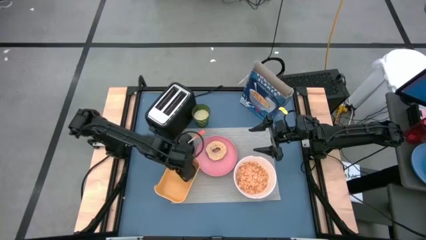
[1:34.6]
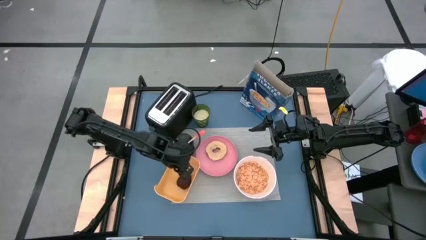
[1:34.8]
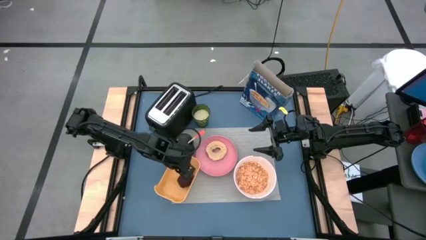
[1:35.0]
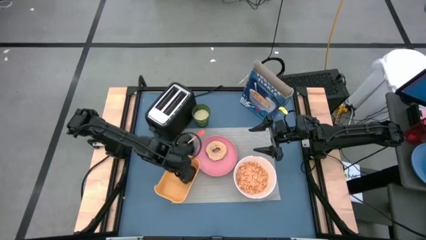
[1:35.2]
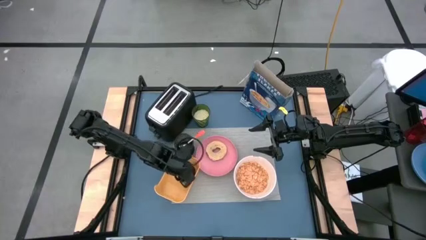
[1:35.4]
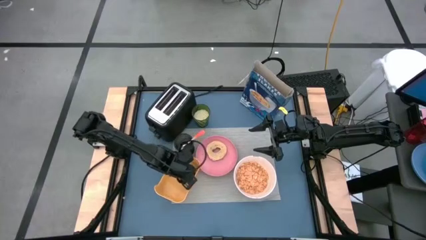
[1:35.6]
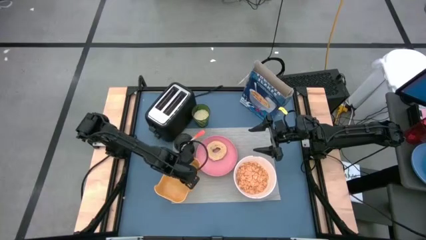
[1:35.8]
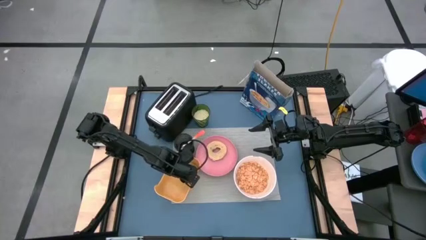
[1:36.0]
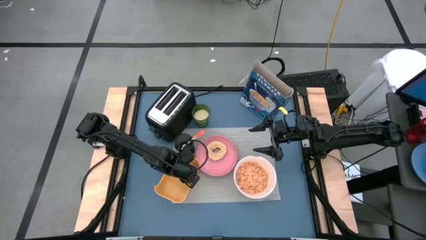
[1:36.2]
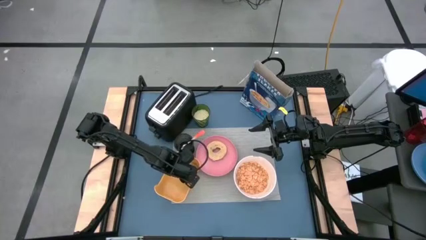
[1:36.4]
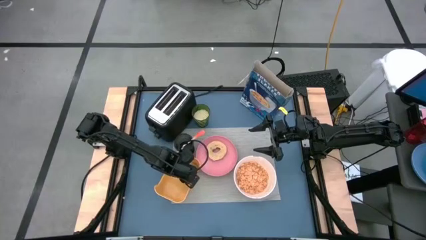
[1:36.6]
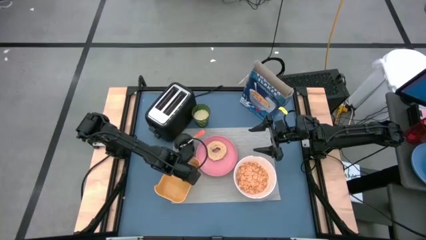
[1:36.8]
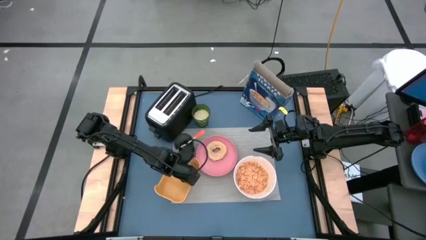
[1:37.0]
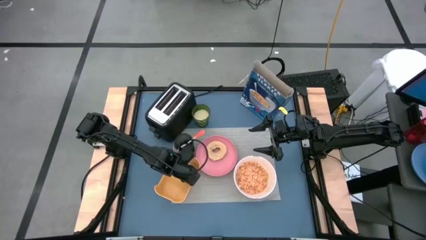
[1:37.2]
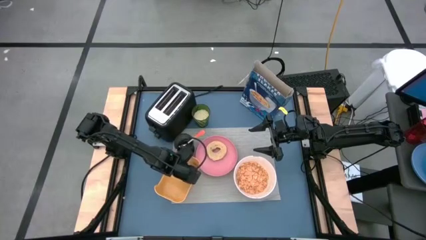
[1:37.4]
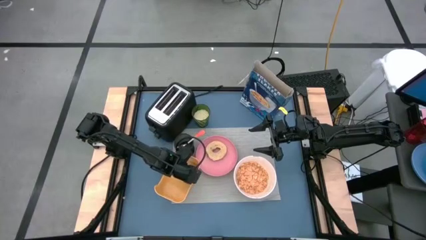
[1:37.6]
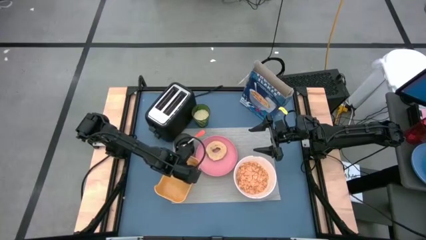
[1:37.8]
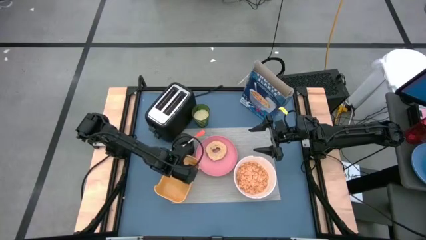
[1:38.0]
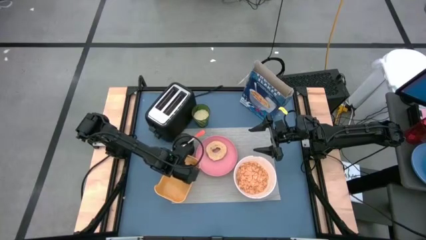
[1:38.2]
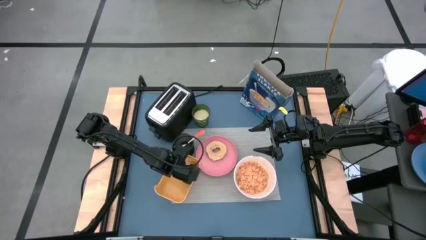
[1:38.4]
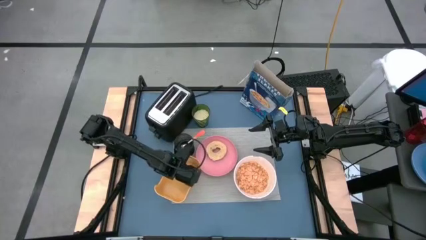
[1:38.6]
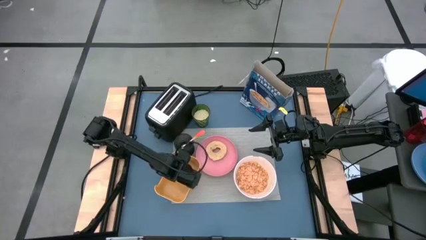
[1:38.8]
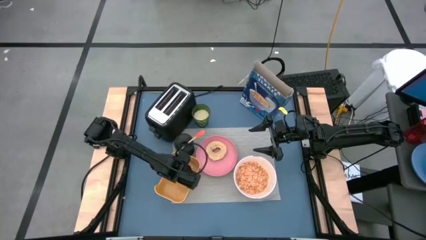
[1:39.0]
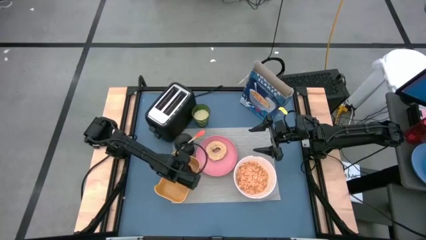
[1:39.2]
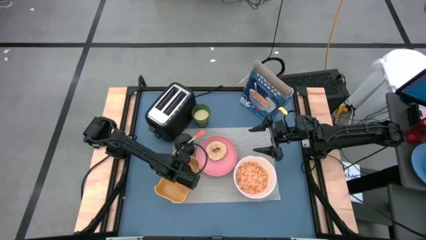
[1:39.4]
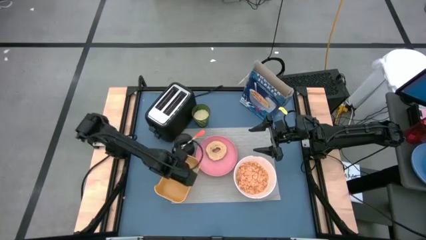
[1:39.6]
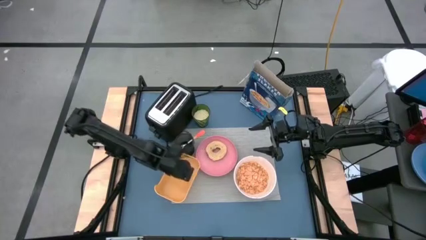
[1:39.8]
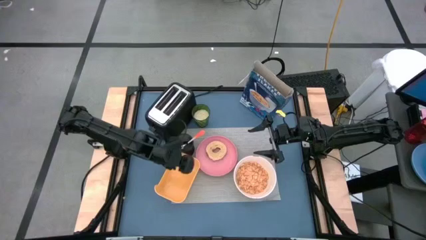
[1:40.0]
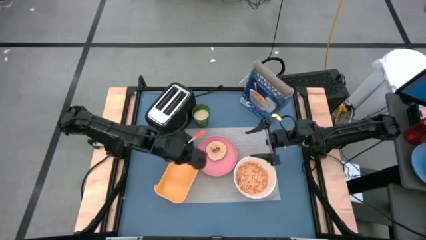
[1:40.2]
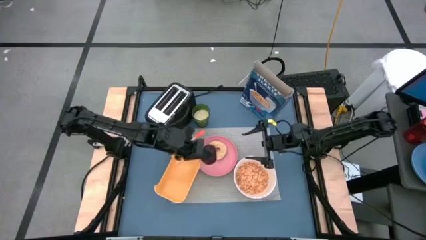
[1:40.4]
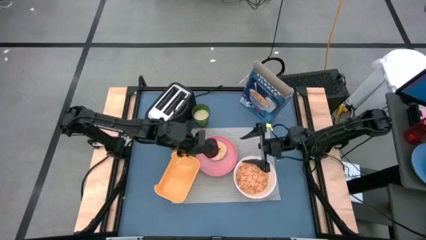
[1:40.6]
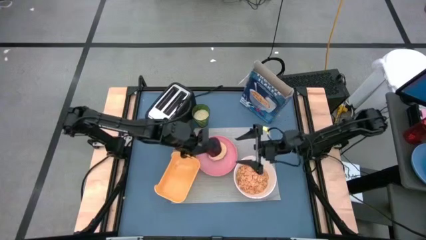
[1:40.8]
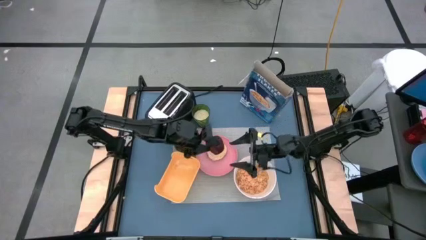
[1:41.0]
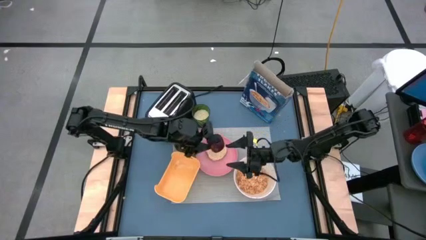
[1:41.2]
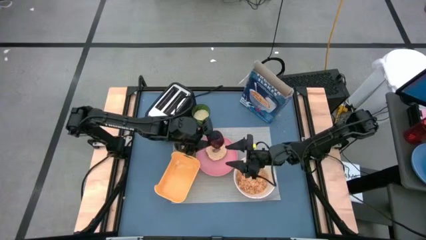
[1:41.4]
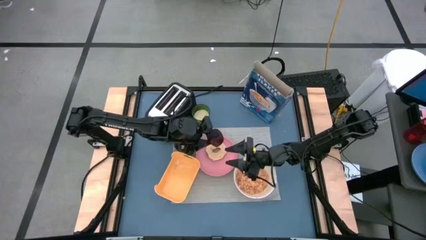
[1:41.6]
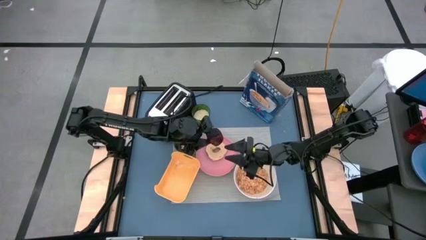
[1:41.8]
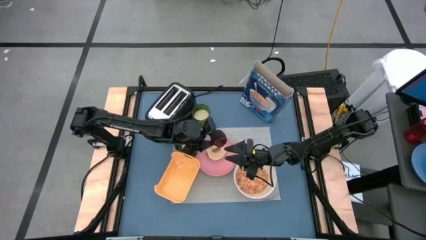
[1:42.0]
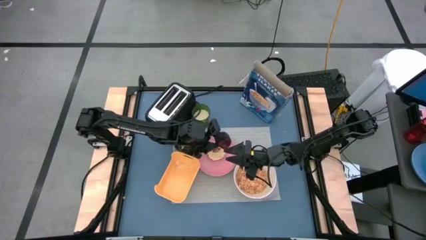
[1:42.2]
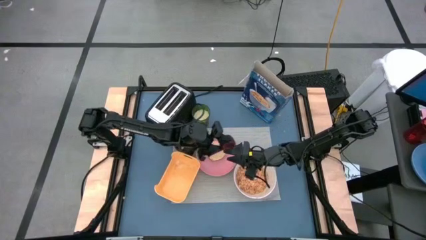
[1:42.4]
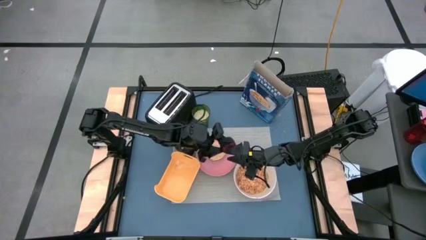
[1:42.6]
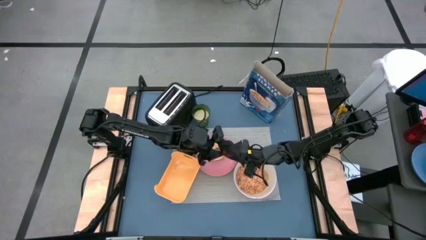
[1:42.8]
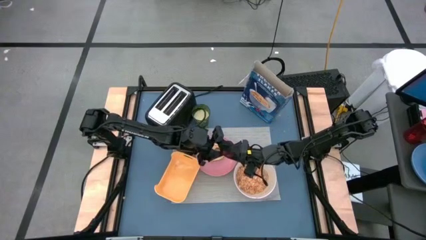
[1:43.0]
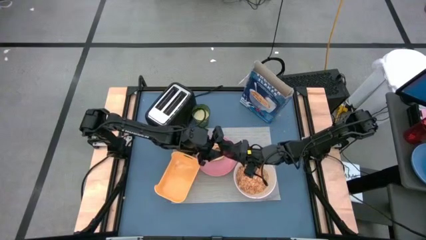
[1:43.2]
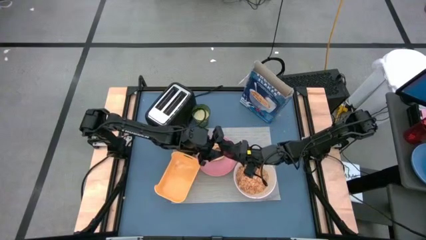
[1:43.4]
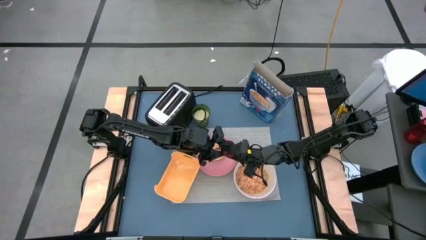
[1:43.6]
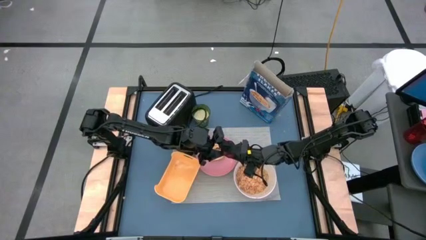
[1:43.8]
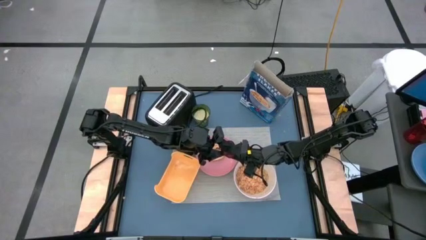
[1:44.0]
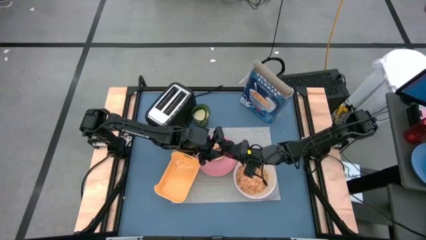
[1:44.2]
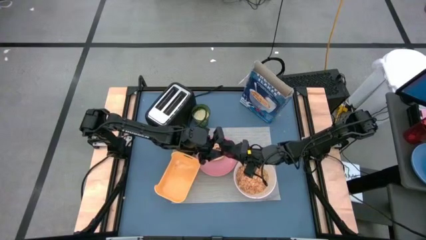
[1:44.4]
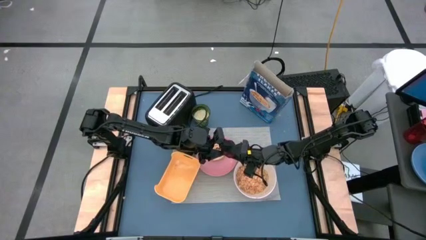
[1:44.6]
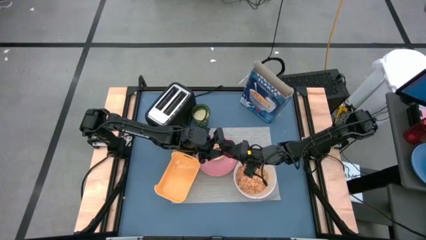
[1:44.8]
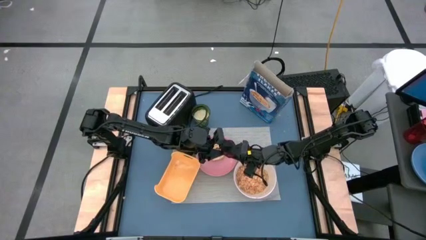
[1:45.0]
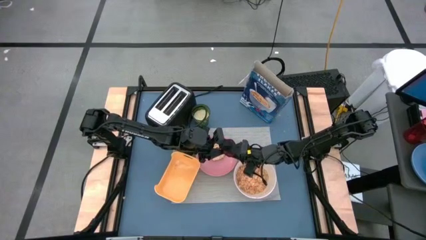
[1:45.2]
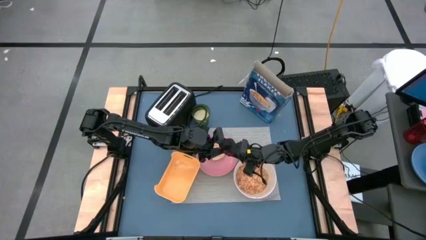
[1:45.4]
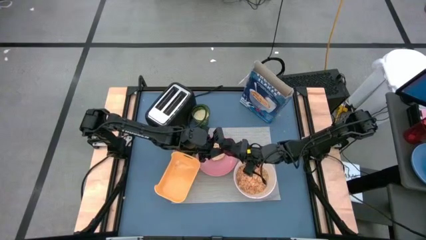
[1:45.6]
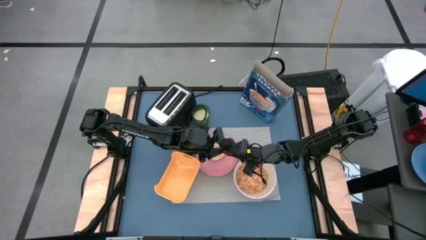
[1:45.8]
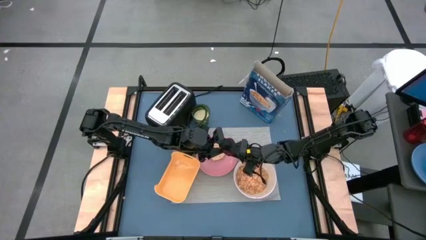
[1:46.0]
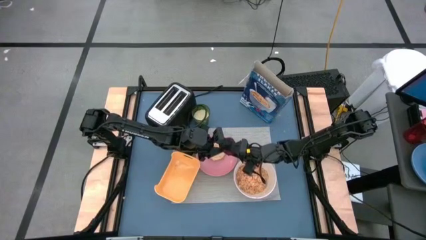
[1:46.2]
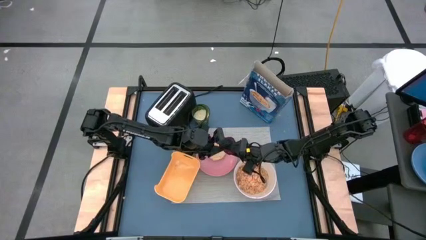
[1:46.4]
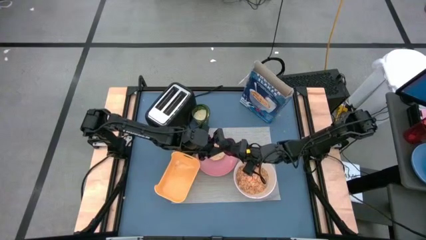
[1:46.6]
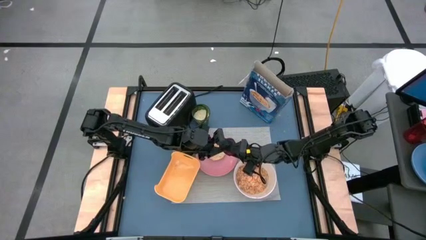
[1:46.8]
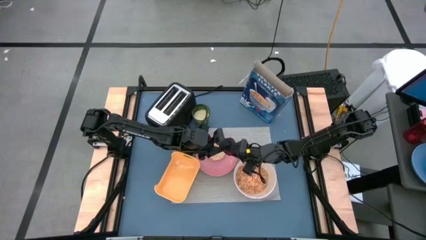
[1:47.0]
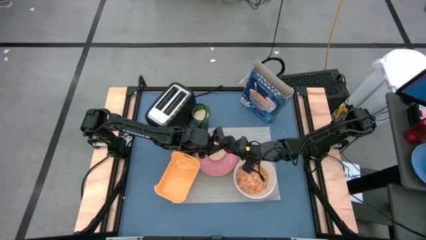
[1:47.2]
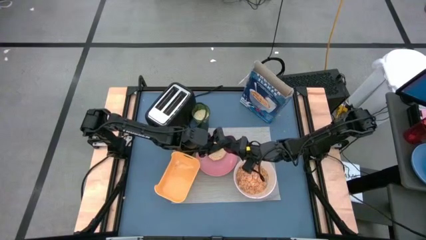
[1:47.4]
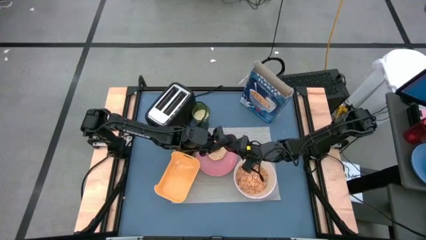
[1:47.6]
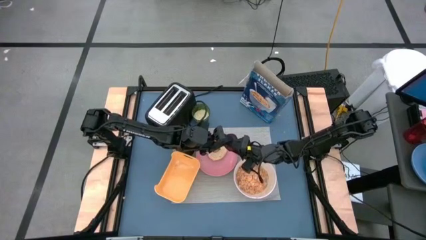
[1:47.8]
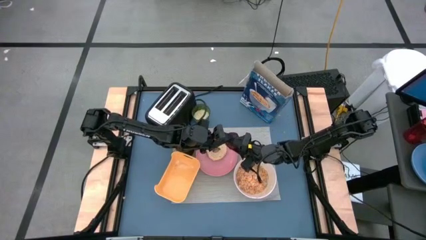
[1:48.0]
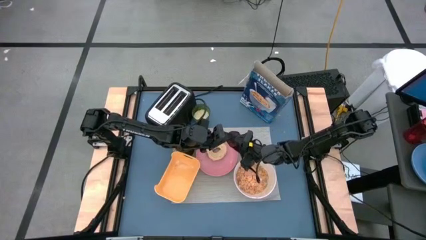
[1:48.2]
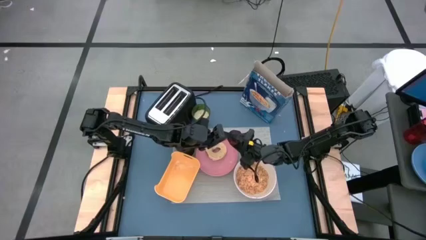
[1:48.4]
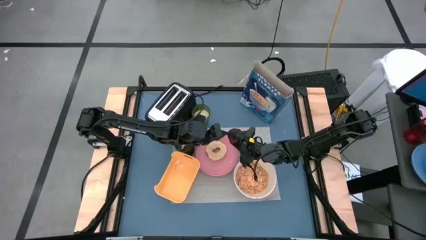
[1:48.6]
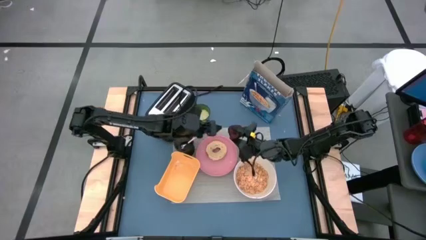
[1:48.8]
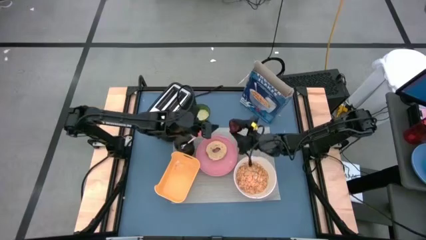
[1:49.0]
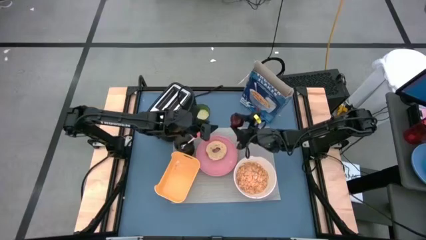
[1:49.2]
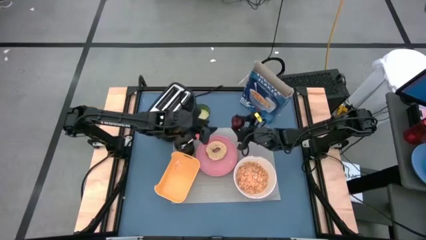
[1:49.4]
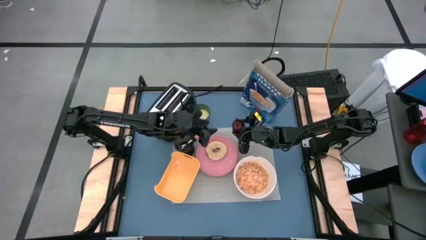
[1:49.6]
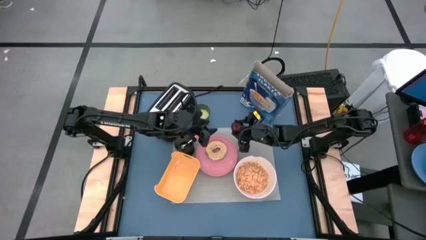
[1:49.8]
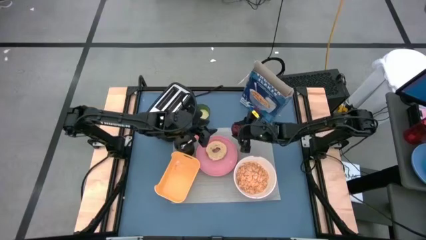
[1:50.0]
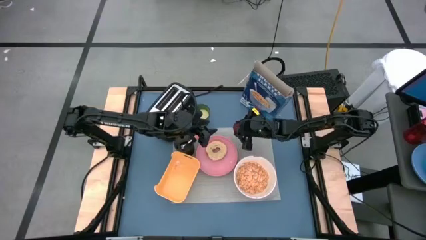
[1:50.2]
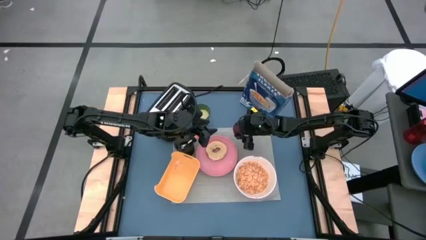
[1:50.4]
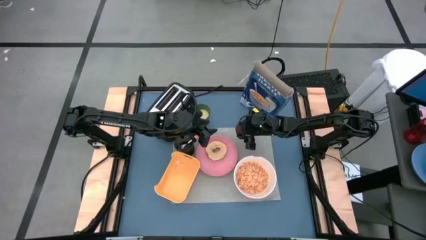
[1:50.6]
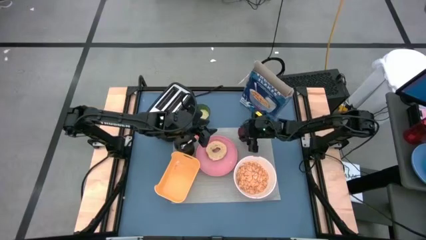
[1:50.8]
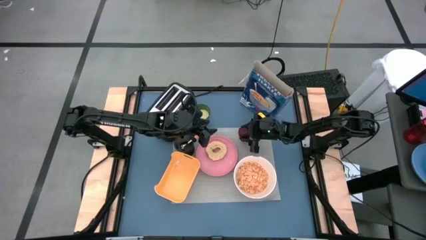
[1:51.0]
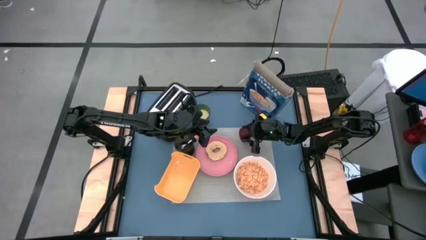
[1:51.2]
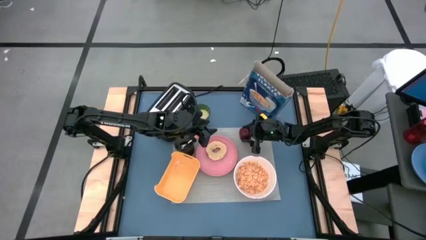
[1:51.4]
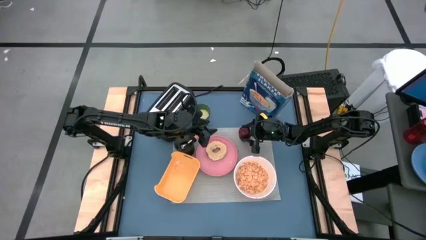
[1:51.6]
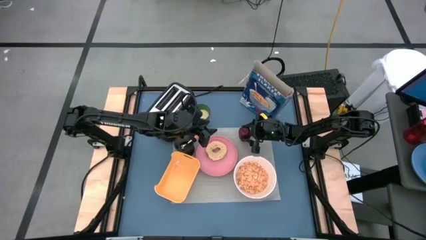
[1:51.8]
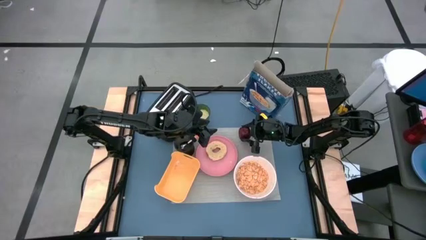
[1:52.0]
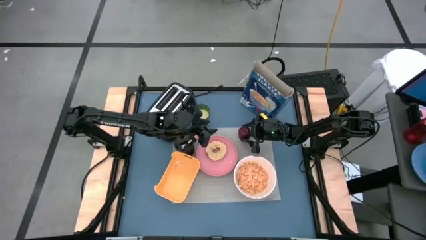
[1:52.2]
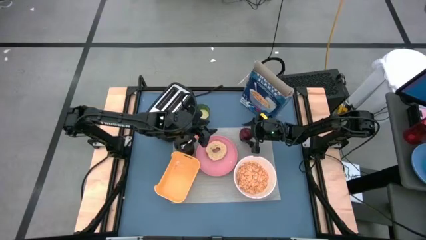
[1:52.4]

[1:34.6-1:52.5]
Task: Arrange a breakfast setting
Put the red apple on the gray placemat
